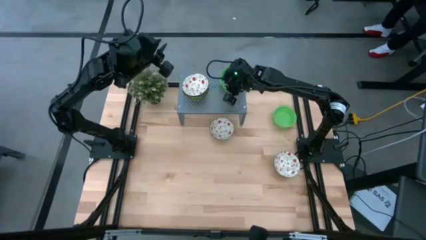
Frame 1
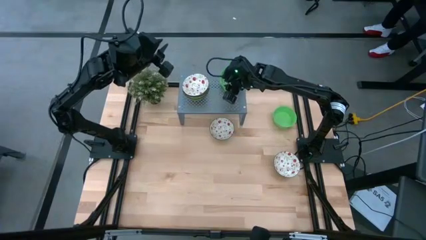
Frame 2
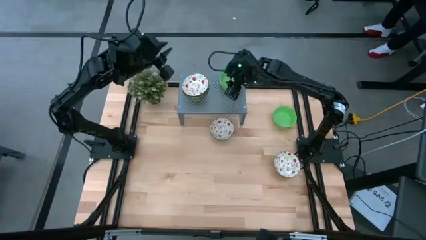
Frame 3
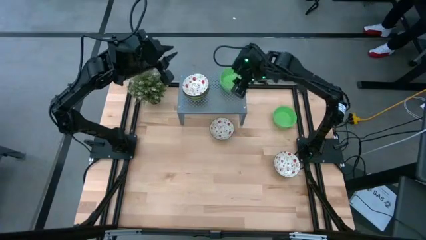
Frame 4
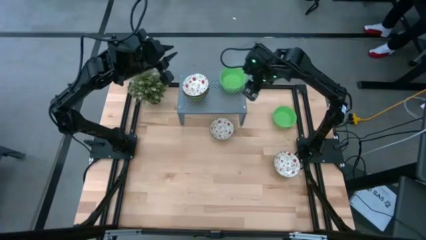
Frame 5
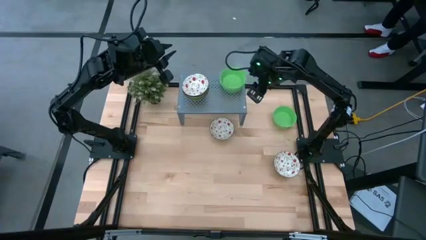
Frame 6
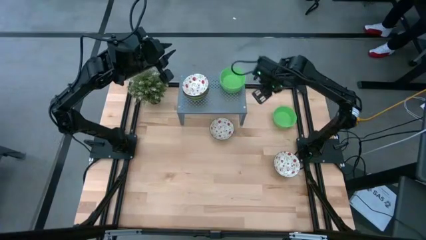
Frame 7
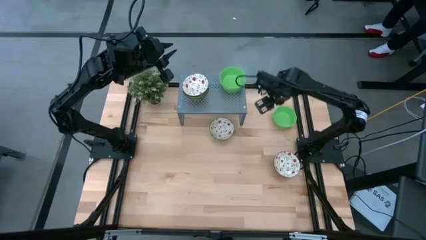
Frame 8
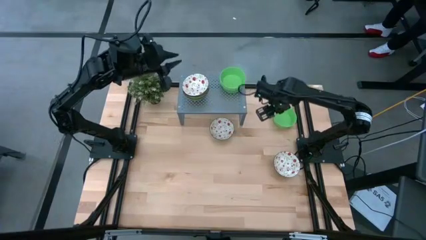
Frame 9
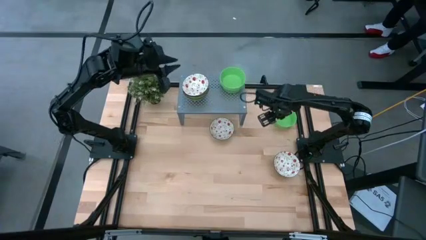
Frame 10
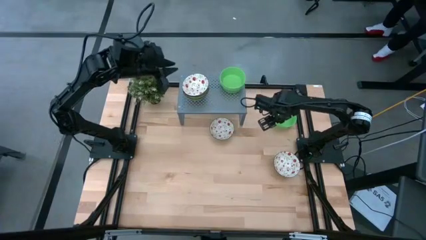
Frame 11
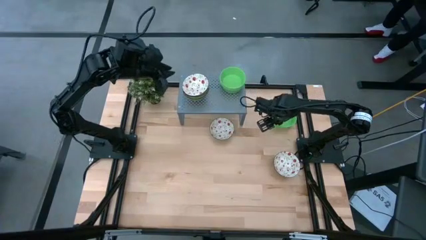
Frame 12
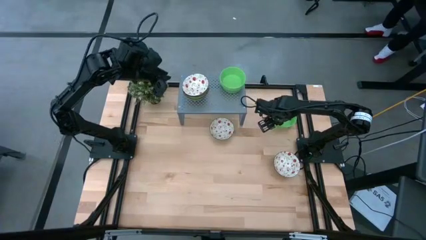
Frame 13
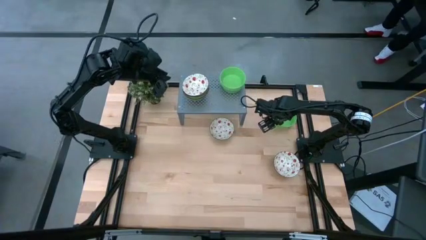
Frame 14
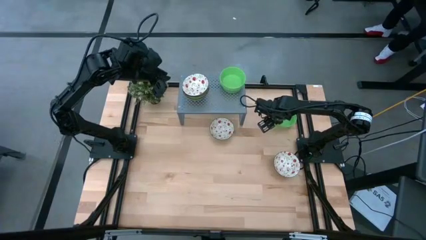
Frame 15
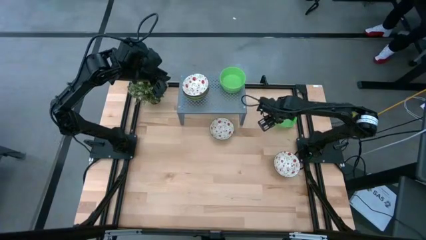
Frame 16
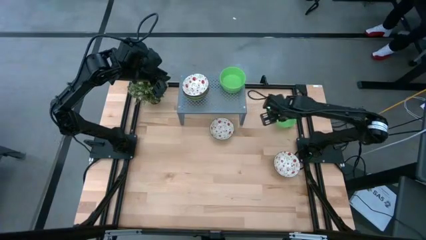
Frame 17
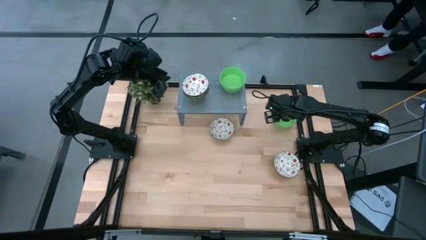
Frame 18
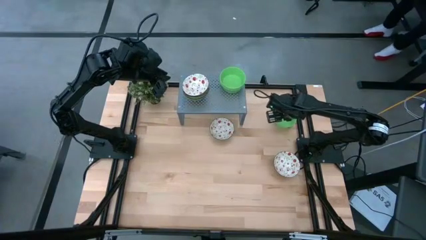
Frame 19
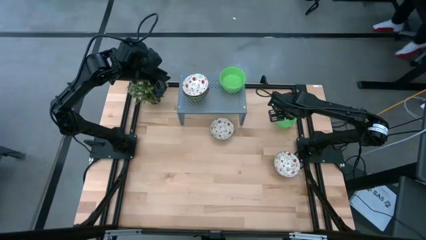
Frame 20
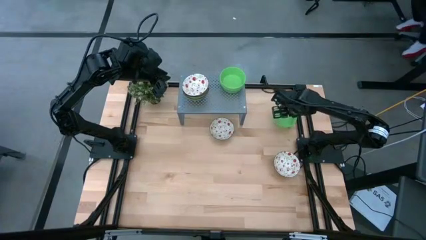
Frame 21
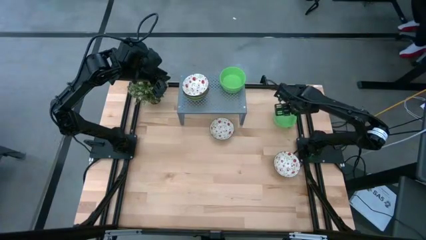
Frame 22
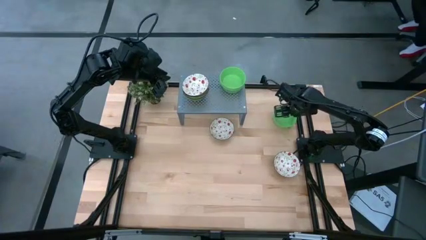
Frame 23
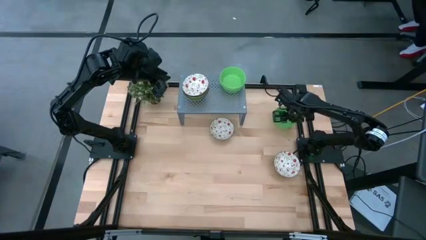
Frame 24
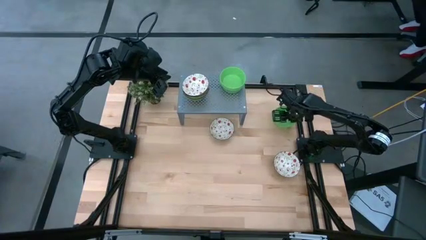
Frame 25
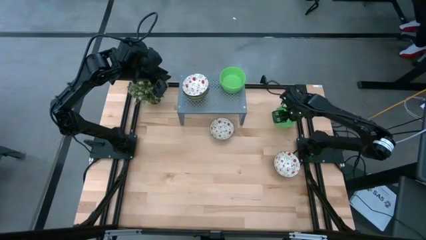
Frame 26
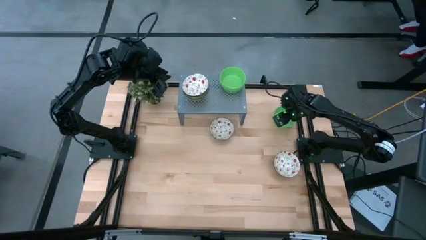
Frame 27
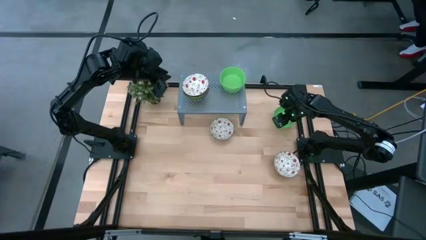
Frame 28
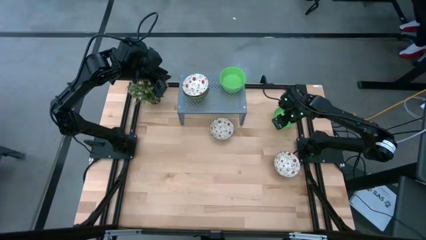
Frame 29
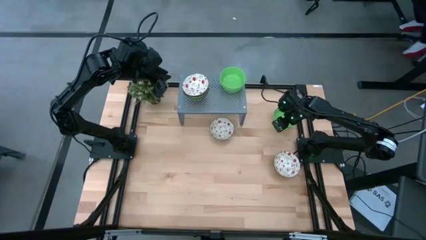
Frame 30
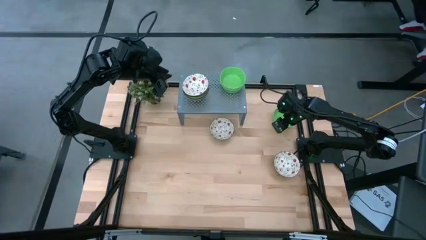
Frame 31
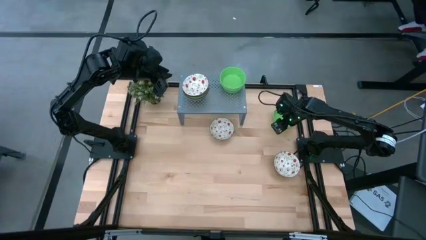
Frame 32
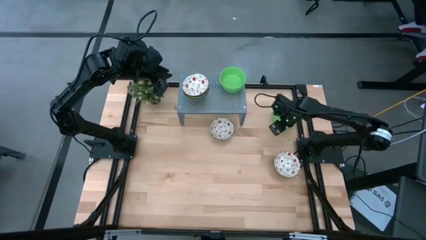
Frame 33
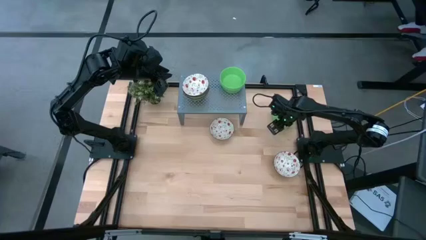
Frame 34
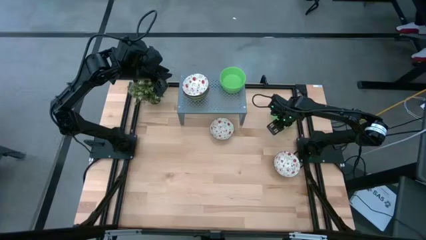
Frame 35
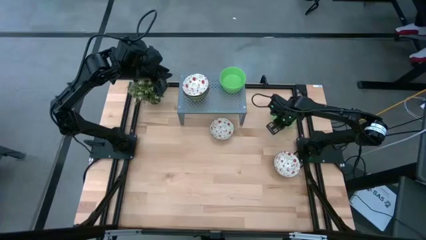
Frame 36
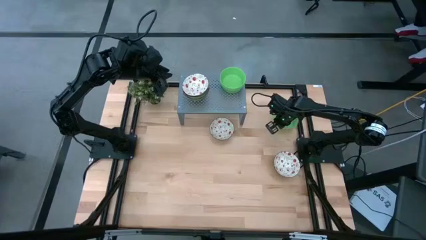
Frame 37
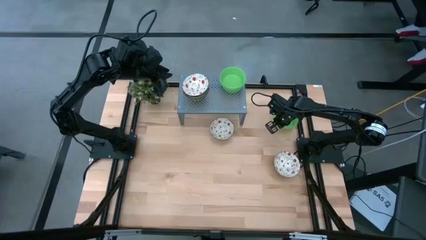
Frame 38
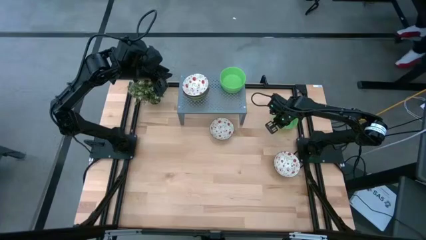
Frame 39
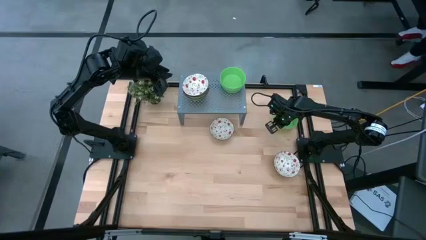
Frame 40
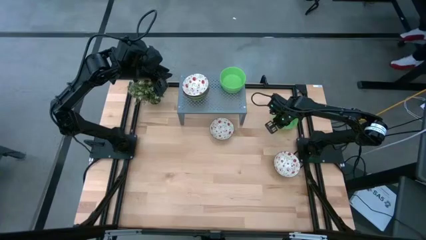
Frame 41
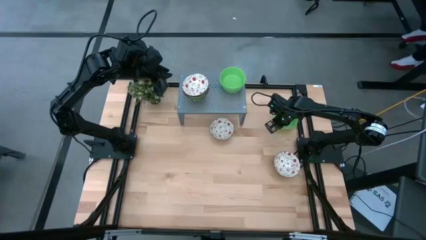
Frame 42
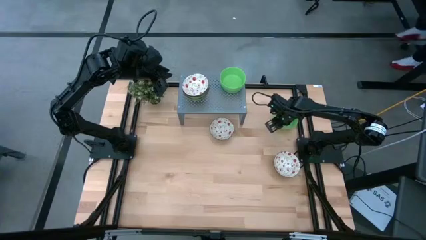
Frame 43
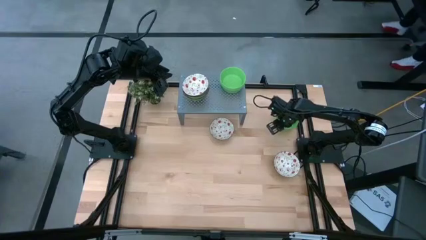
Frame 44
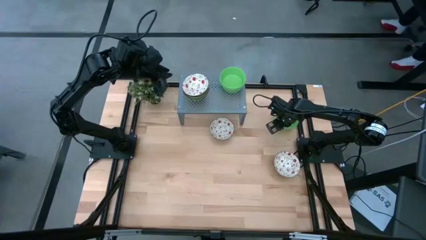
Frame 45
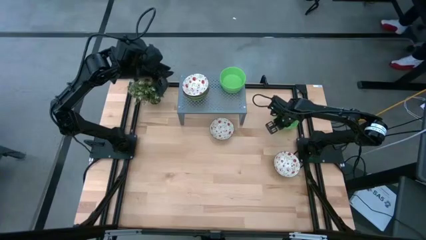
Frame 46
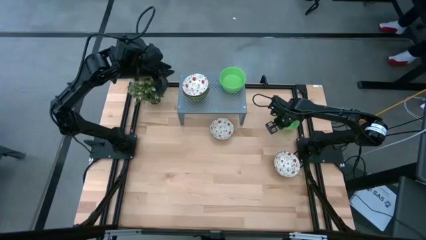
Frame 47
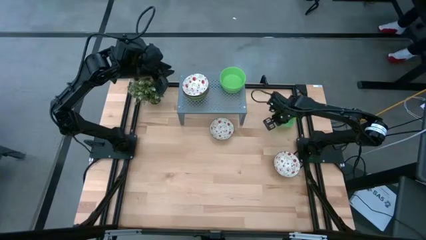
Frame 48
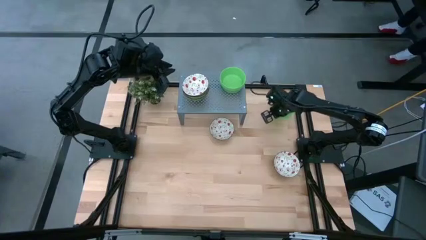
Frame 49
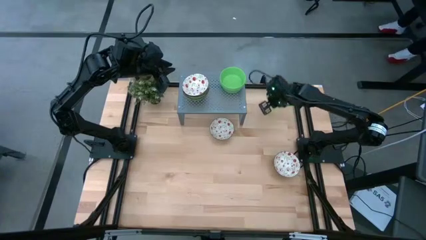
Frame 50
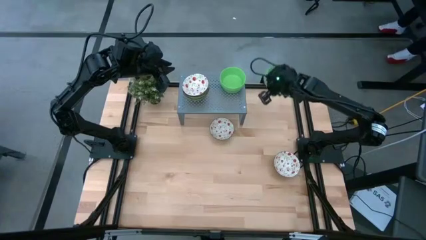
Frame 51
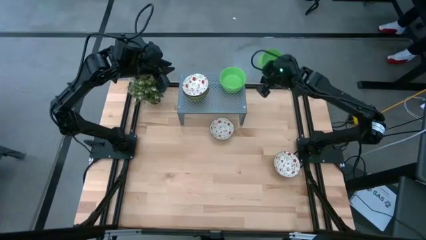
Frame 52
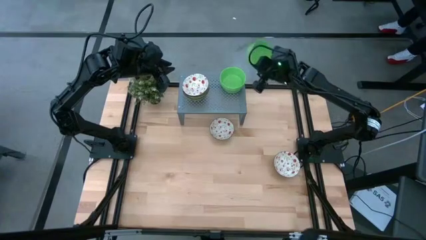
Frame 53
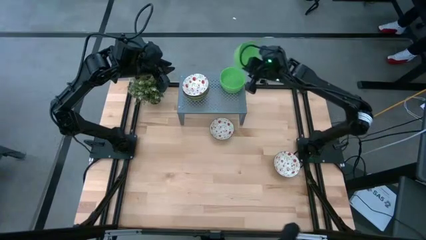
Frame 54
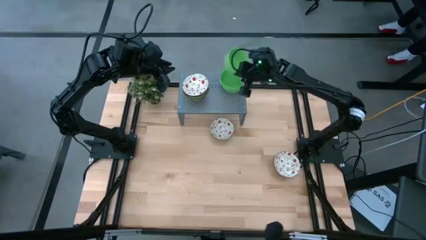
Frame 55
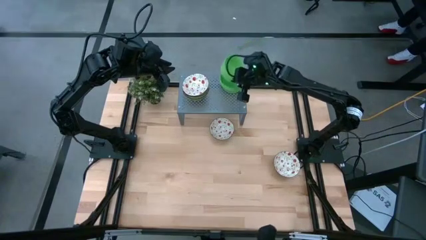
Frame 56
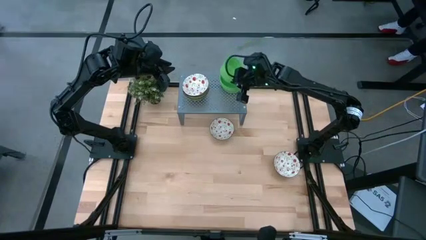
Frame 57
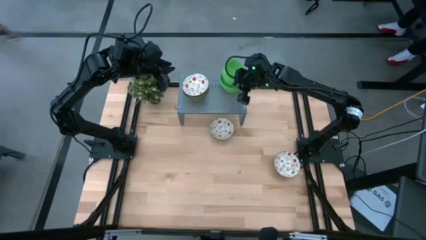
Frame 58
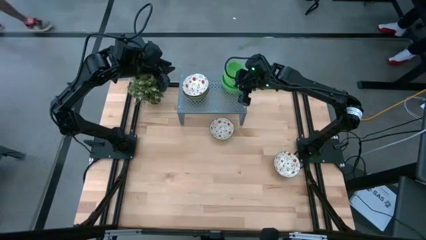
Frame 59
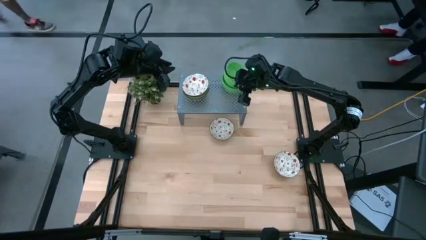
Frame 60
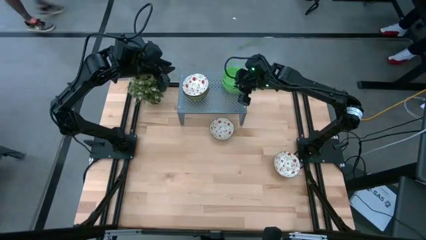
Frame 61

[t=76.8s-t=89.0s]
Task: Pick & Place Mini bowls
Stack the green bowl on the green bowl

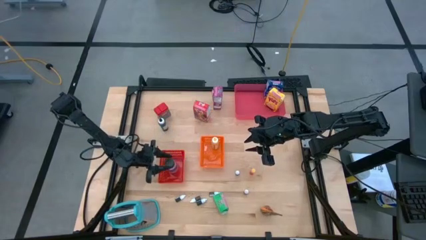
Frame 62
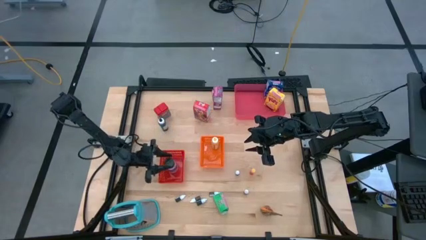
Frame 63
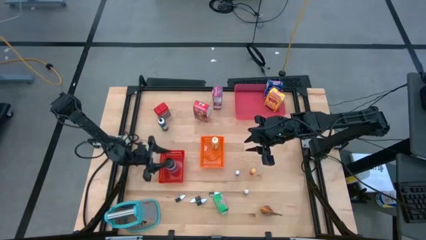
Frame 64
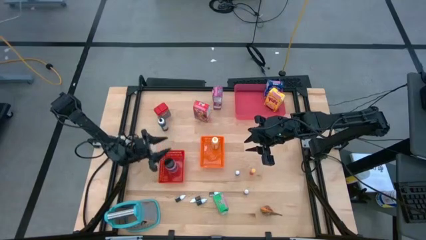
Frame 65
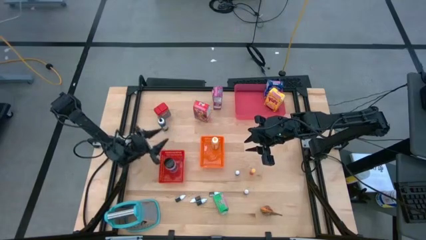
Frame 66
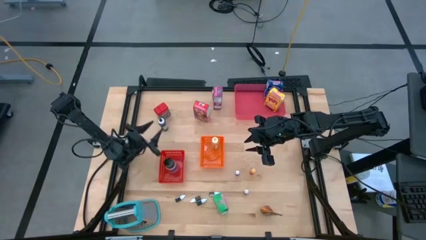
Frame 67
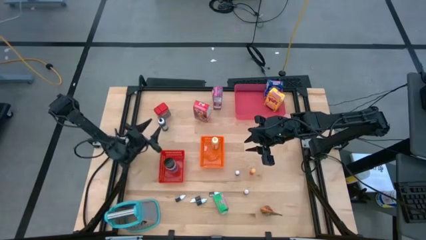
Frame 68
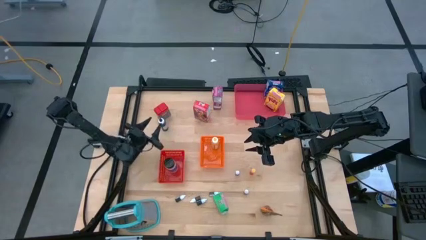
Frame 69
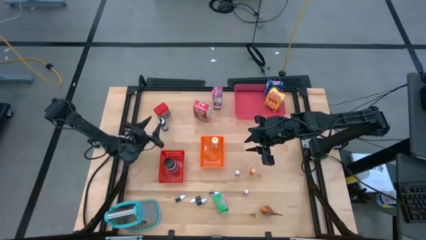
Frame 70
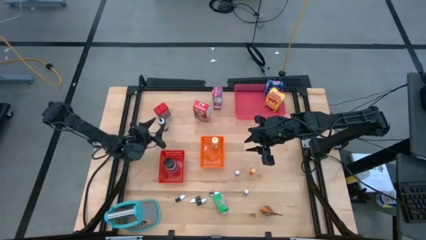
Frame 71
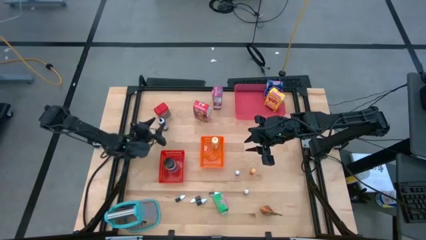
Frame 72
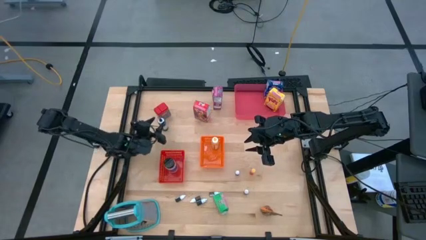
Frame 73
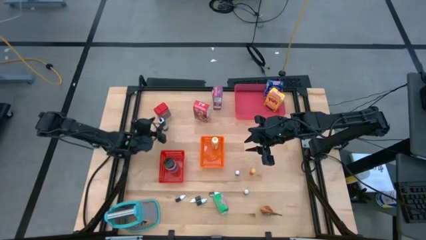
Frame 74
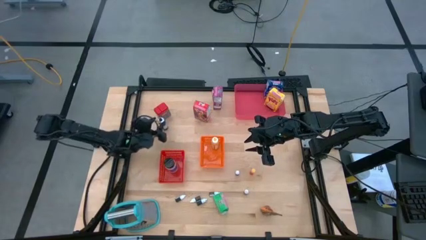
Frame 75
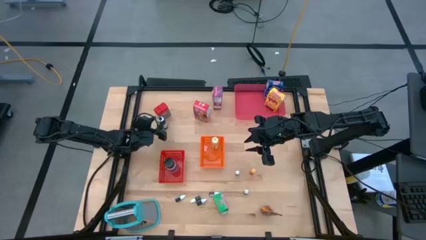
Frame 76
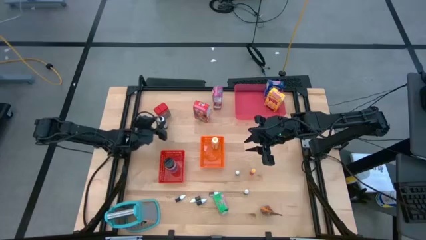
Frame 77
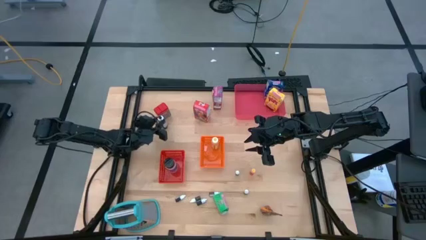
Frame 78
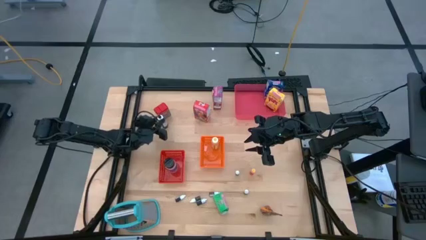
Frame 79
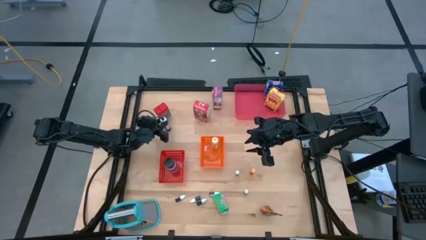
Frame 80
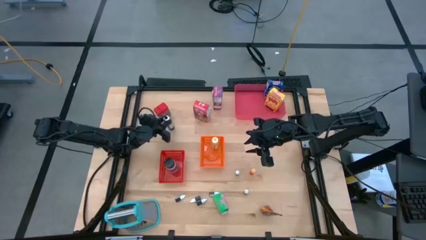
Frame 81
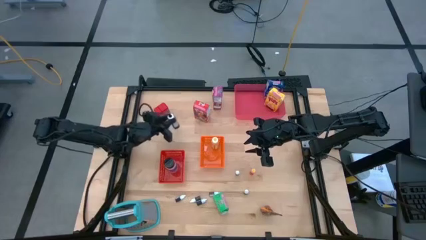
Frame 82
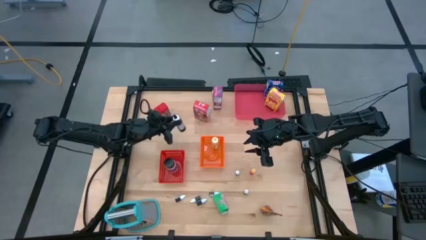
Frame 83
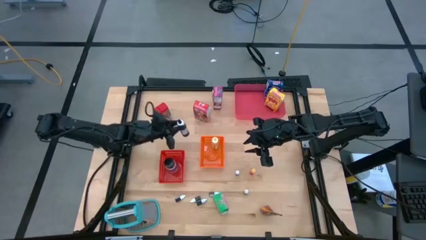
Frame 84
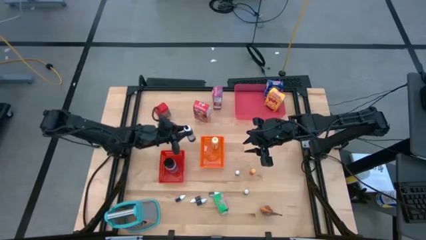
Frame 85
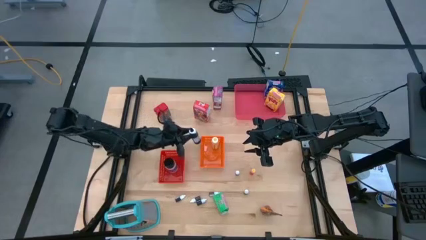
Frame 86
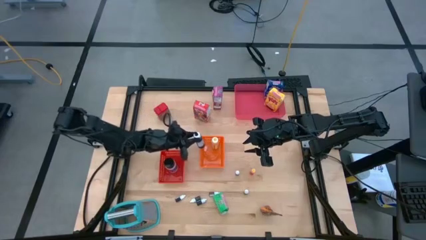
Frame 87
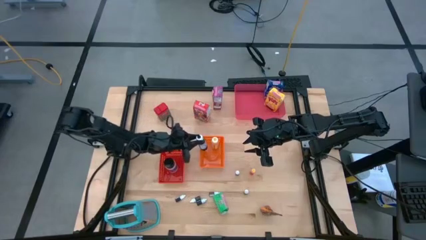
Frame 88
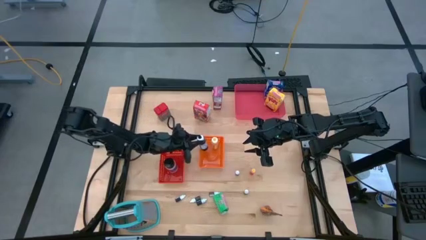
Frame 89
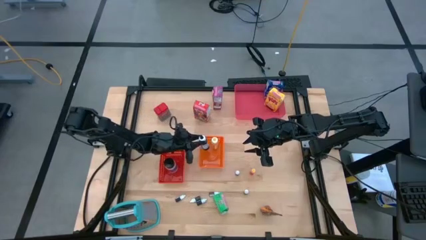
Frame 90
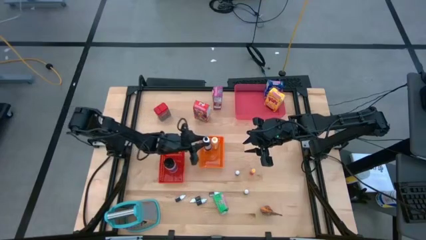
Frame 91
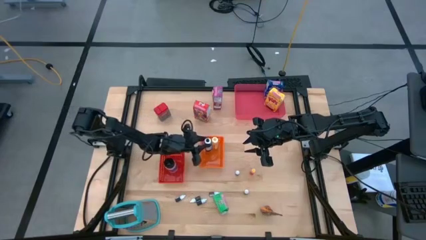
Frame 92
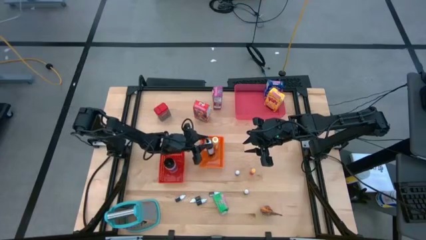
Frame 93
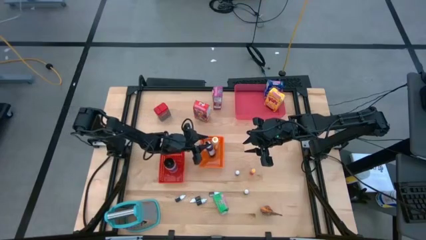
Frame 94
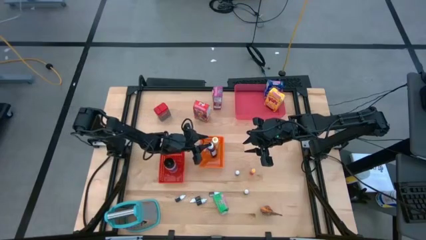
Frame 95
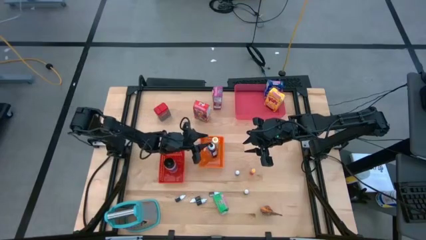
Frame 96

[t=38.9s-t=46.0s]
Task: Pick & Place Kitchen Items
Put the large black food coloring bottle into the orange bin
